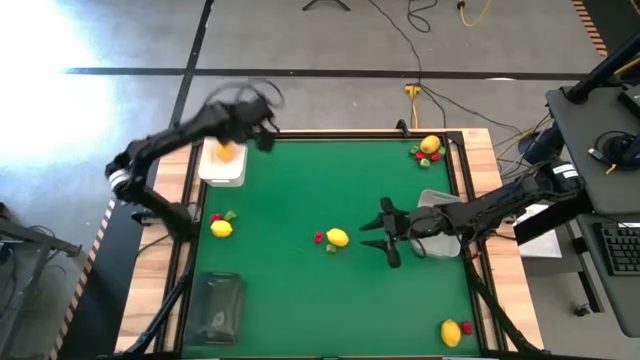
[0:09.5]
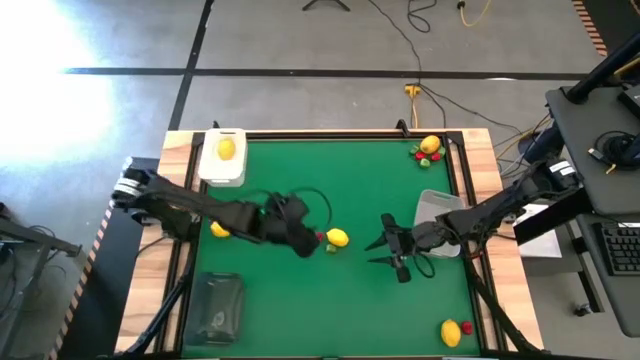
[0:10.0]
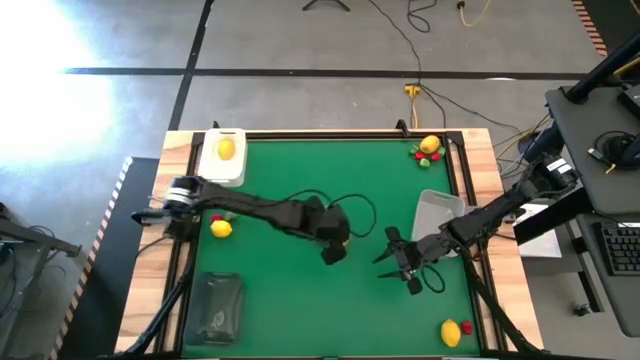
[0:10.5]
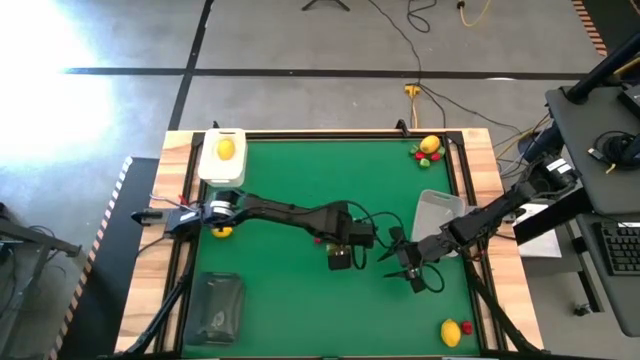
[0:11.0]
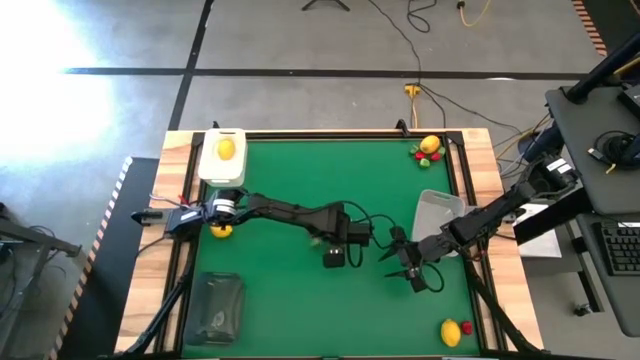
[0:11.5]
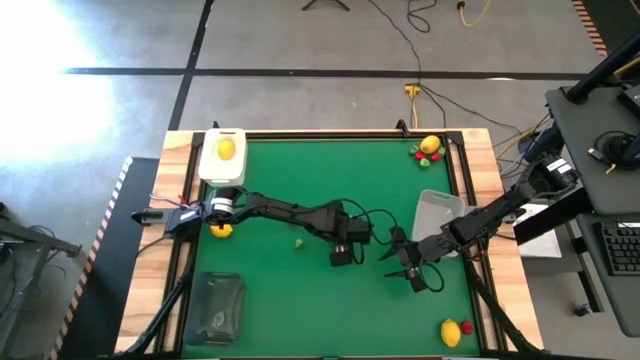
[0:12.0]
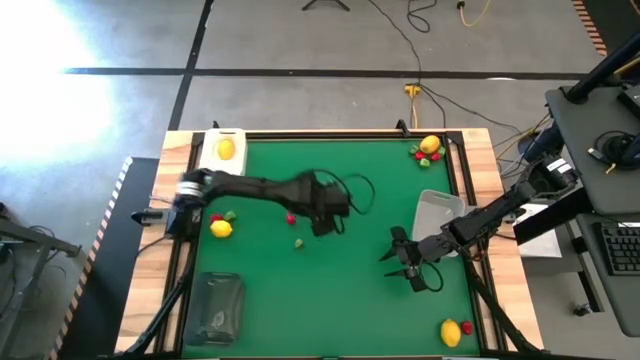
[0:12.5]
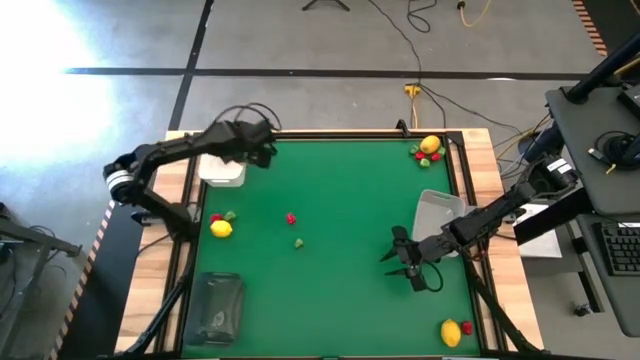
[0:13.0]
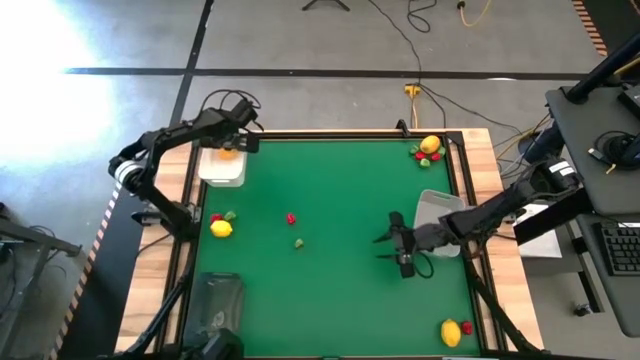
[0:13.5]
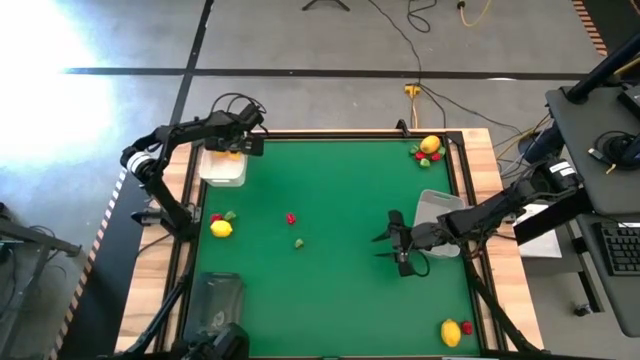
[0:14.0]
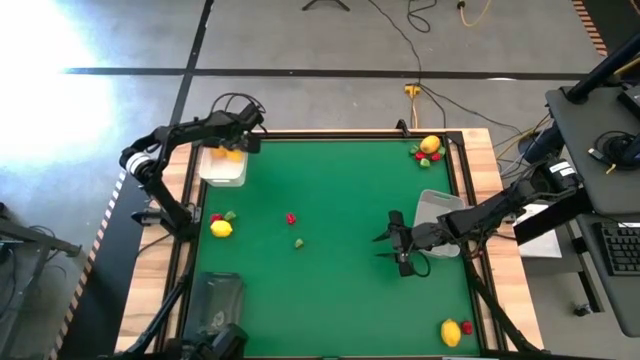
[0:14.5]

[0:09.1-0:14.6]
Task: Sort produce into baskets
Put the yellow lemon into the white bin

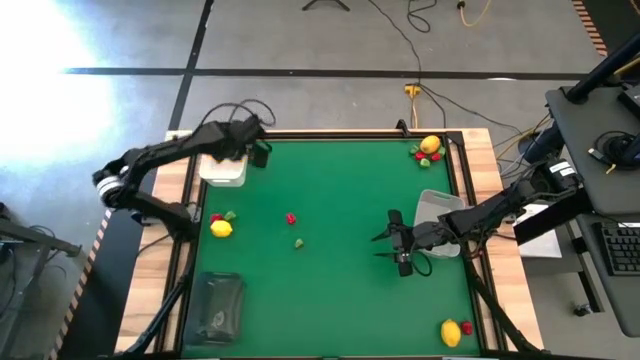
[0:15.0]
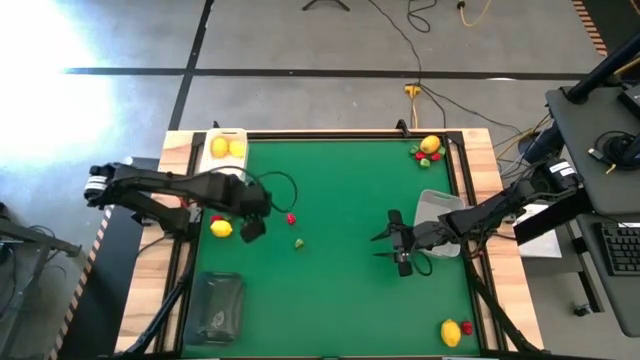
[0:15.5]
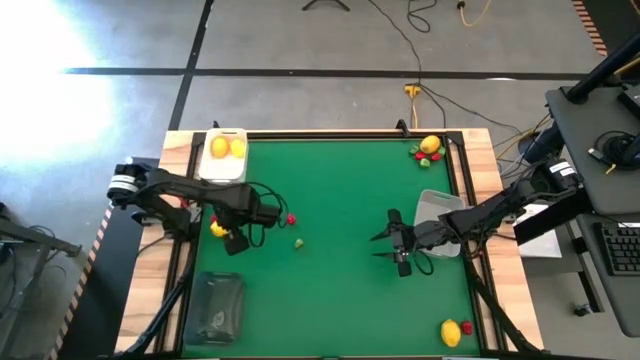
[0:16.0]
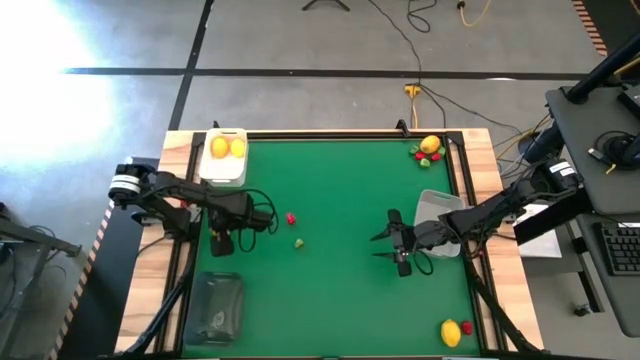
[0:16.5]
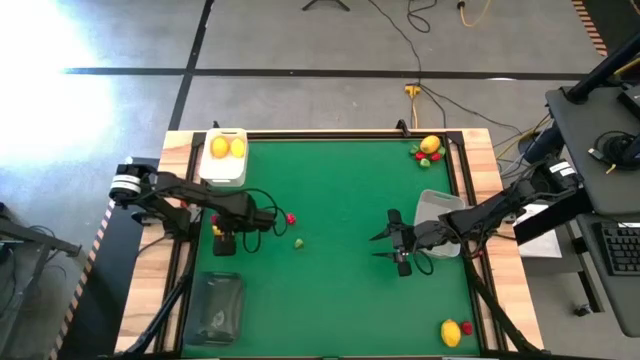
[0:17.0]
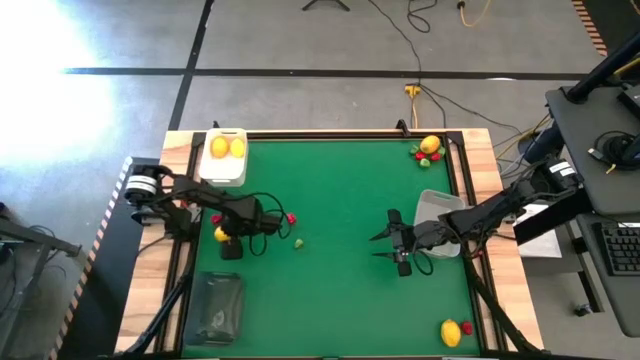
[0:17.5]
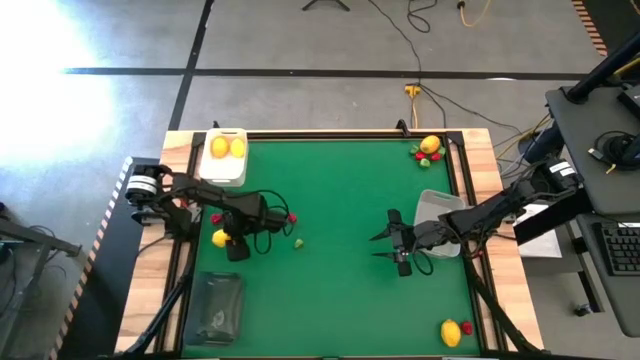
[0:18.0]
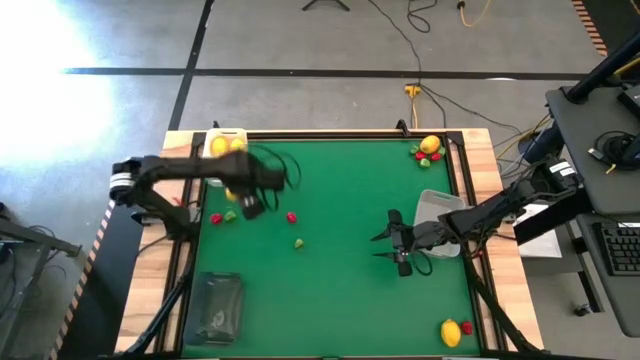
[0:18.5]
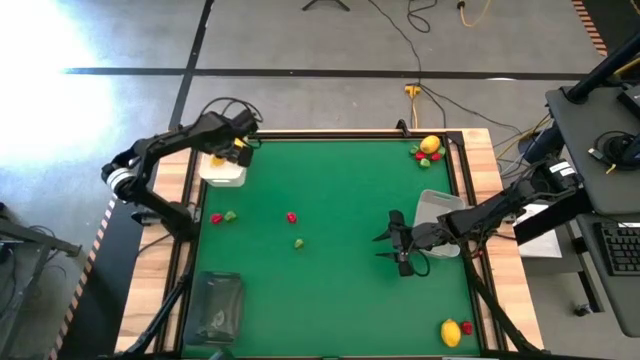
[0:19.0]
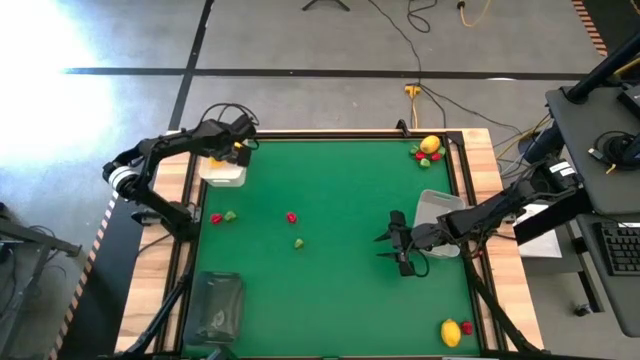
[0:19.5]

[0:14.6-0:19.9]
Put the yellow lemon into the white bin

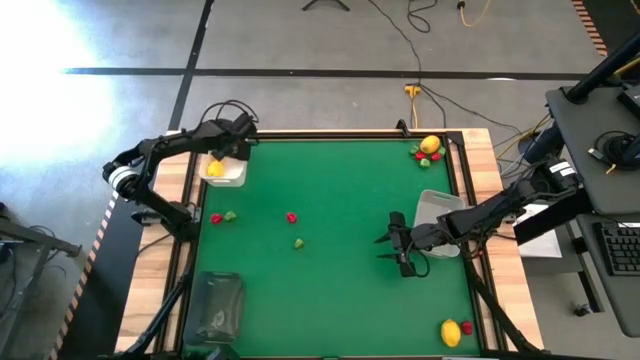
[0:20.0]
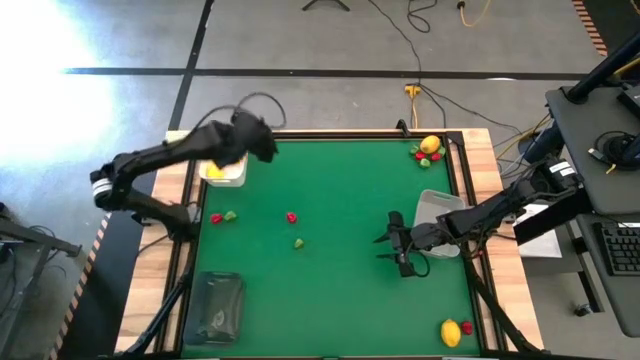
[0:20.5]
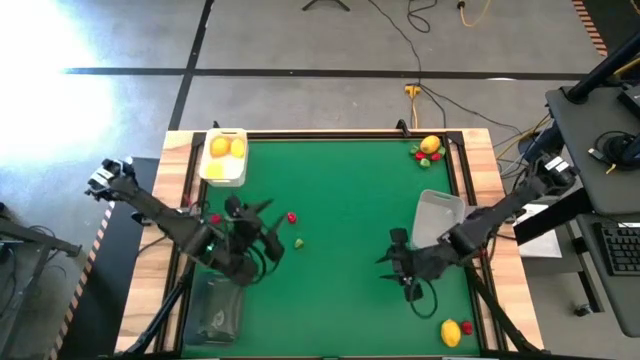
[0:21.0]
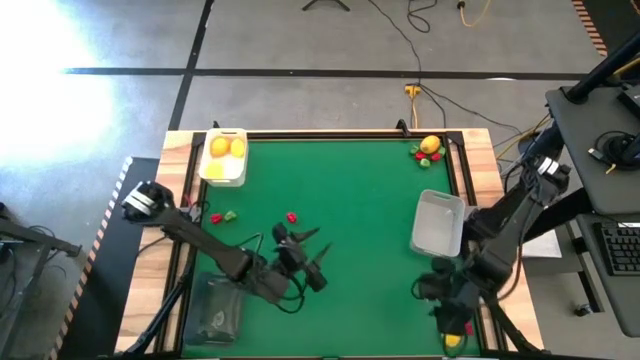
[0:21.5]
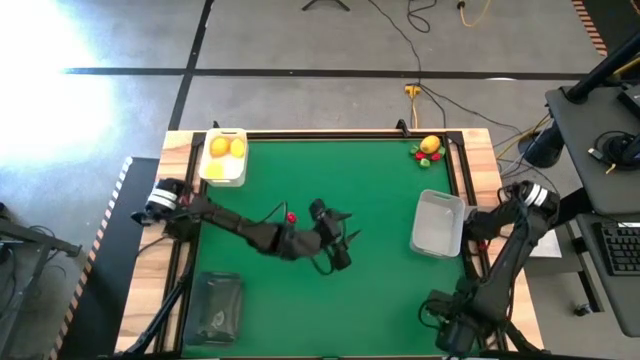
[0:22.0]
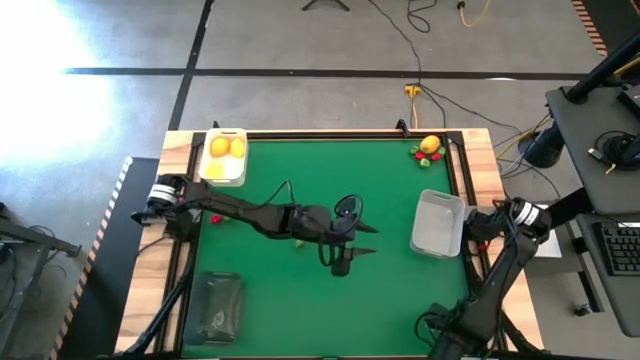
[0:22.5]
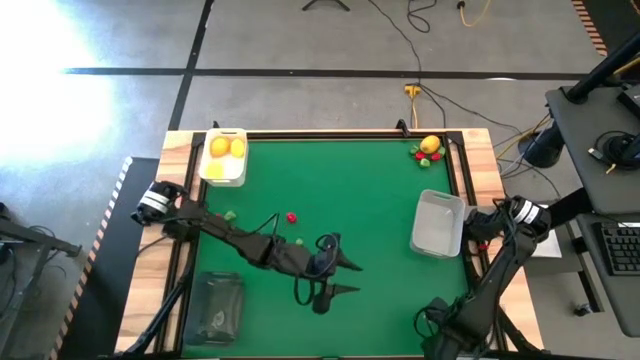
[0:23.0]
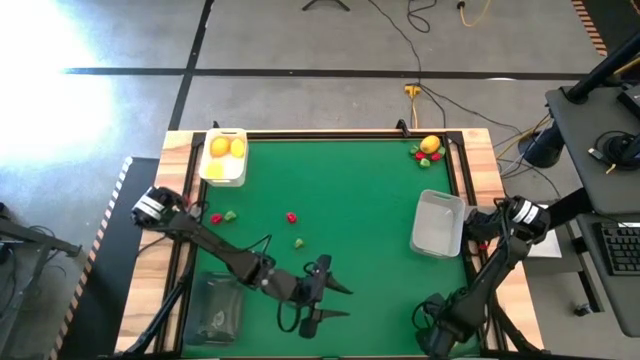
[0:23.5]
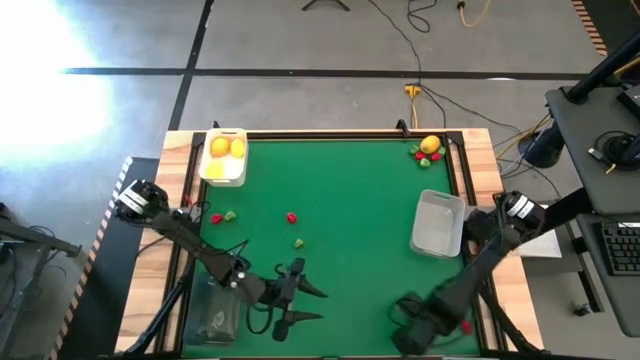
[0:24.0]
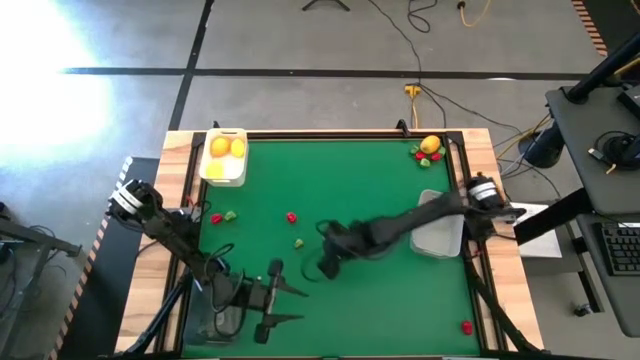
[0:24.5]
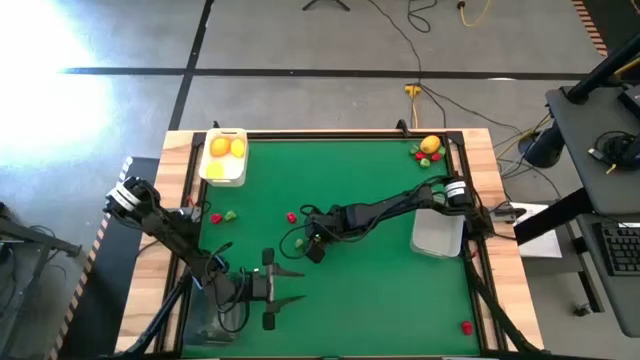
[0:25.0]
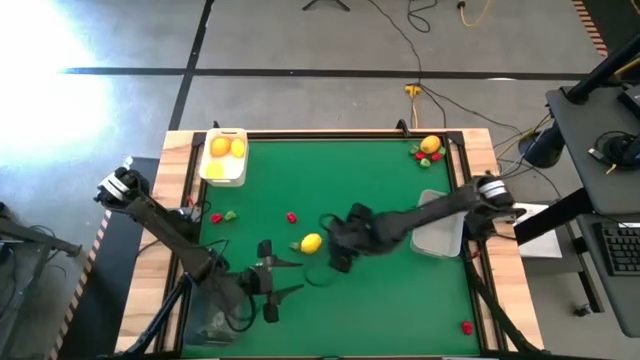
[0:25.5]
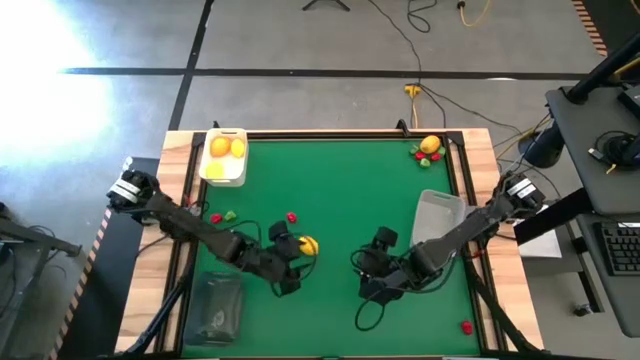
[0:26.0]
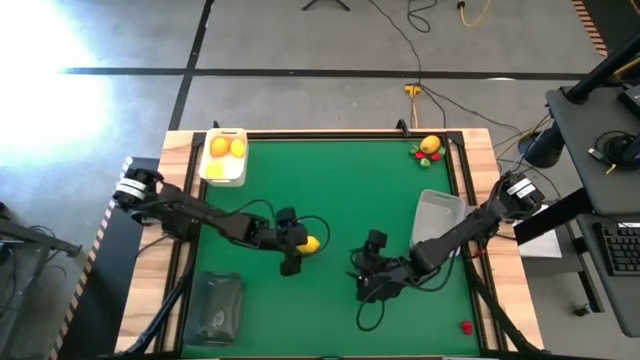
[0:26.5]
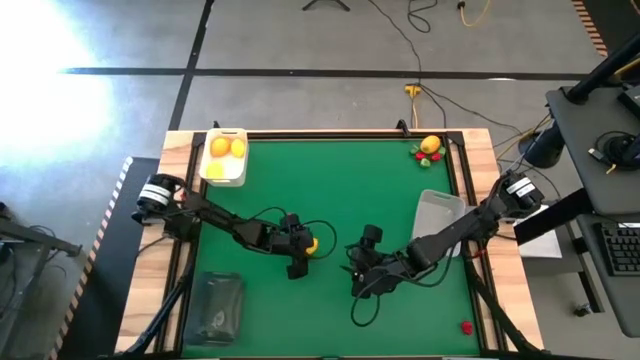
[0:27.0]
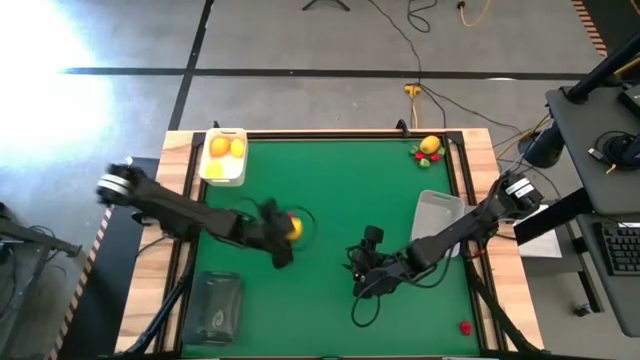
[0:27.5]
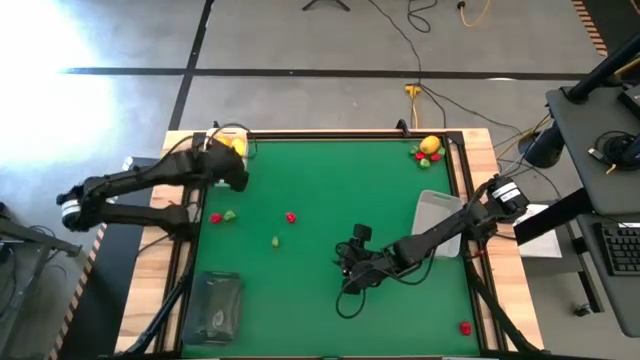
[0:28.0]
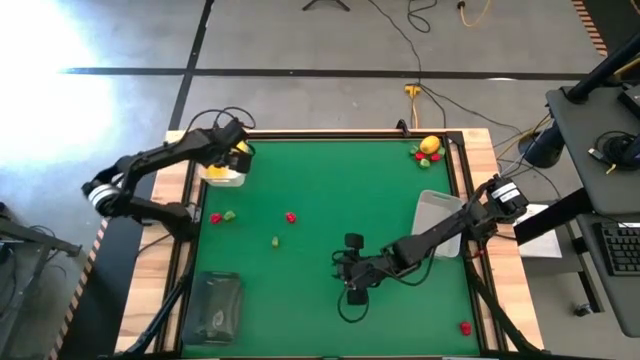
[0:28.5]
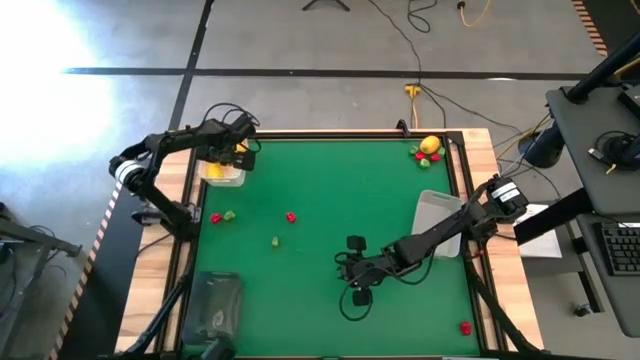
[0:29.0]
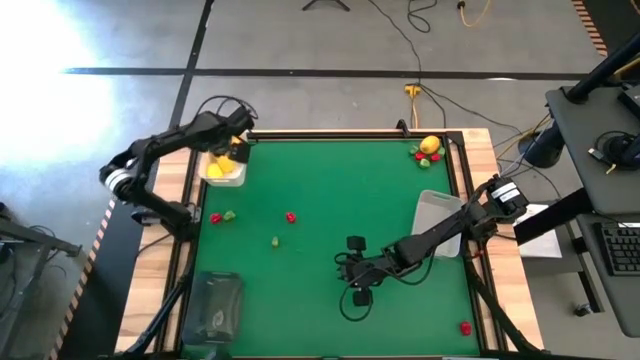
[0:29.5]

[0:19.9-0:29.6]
Put the yellow lemon into the white bin
